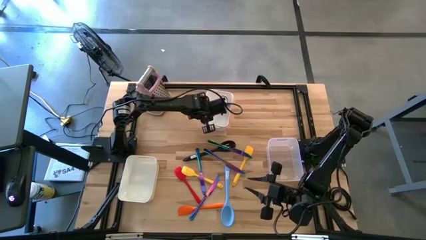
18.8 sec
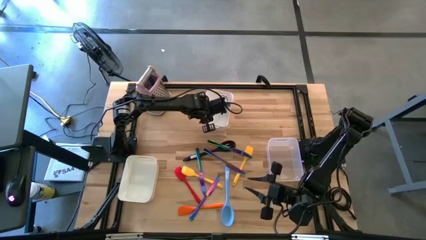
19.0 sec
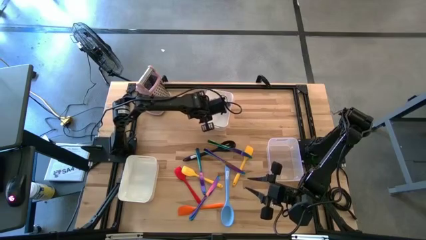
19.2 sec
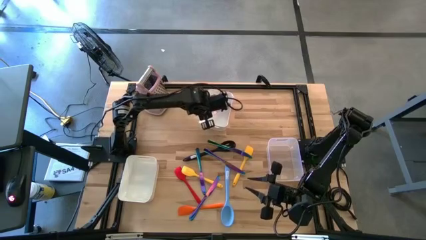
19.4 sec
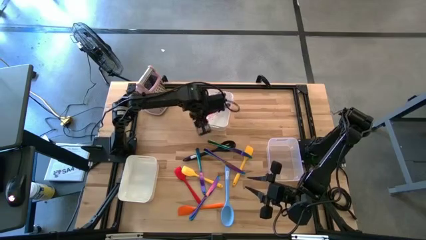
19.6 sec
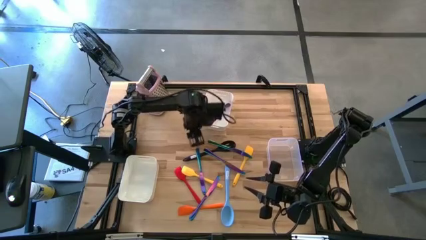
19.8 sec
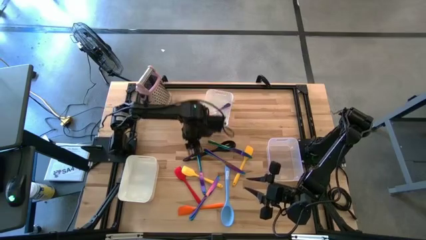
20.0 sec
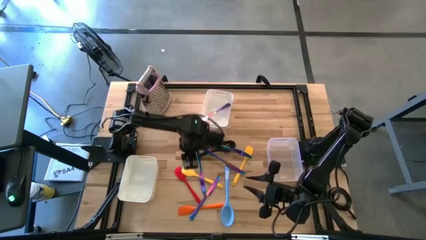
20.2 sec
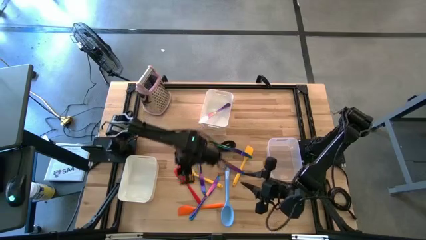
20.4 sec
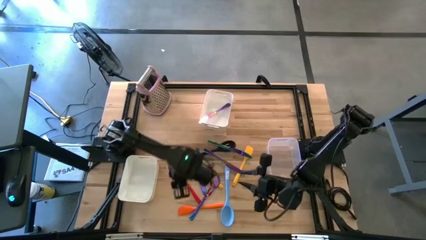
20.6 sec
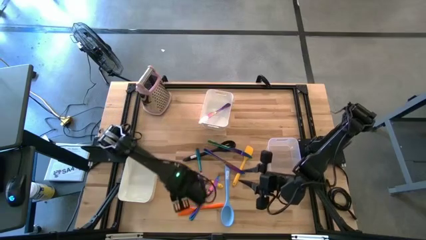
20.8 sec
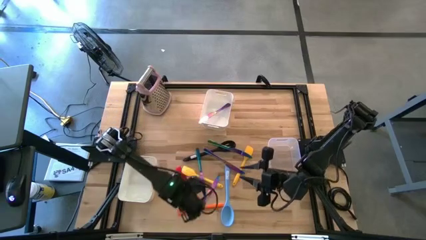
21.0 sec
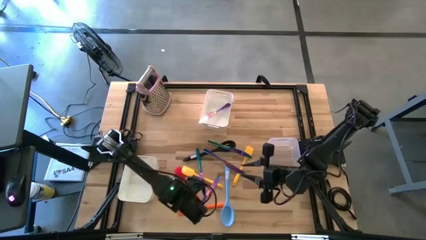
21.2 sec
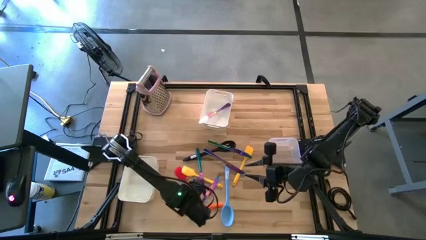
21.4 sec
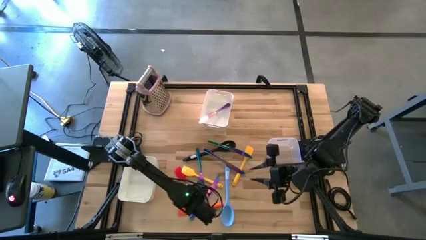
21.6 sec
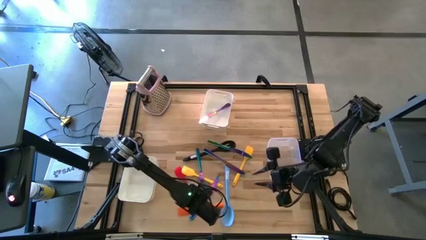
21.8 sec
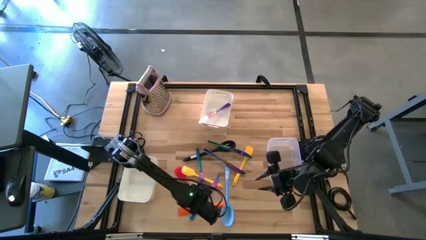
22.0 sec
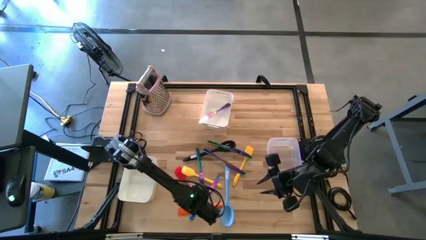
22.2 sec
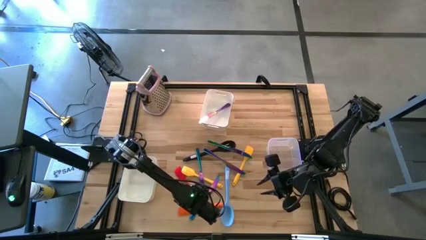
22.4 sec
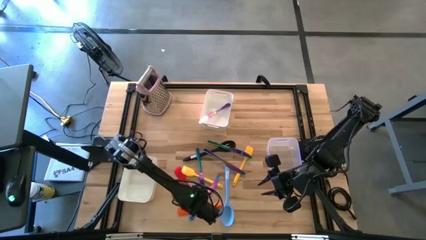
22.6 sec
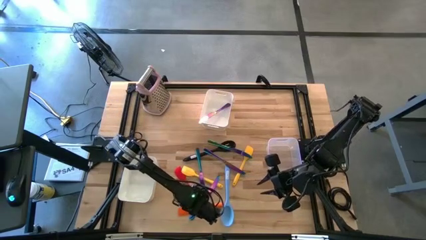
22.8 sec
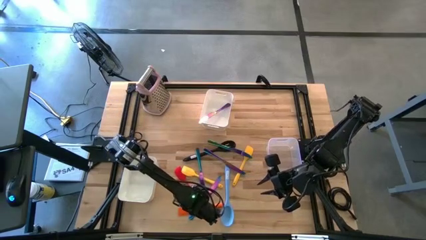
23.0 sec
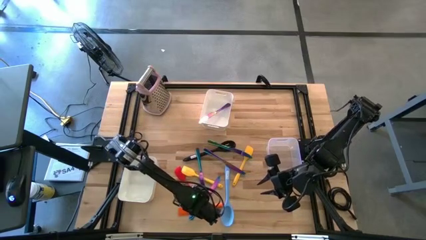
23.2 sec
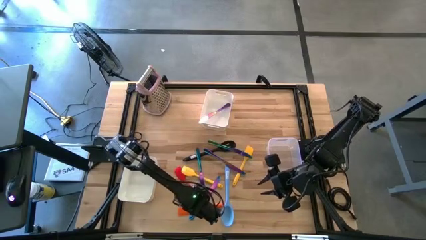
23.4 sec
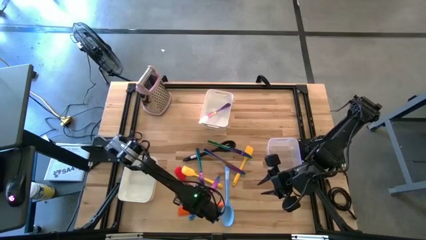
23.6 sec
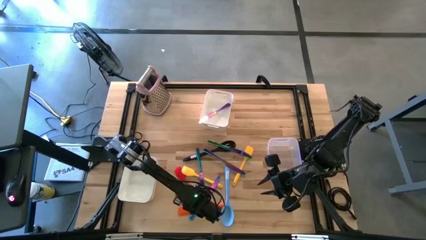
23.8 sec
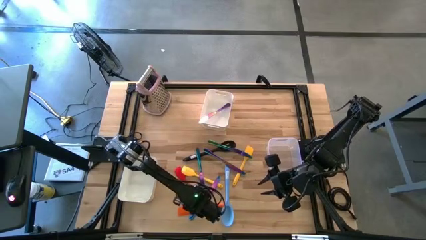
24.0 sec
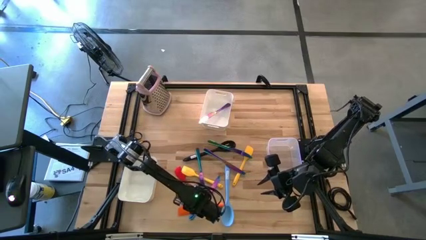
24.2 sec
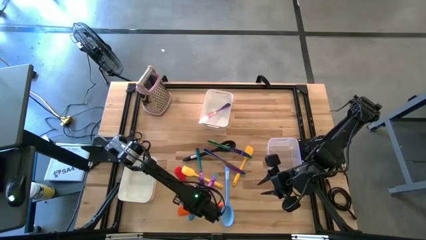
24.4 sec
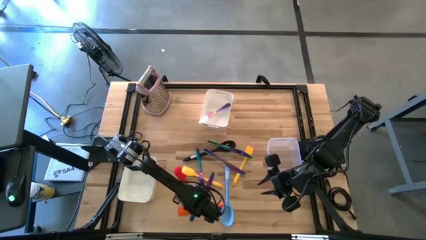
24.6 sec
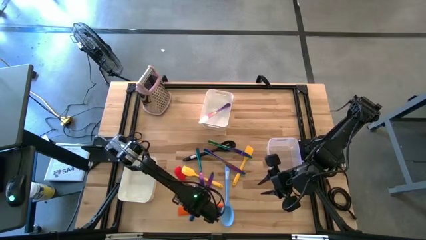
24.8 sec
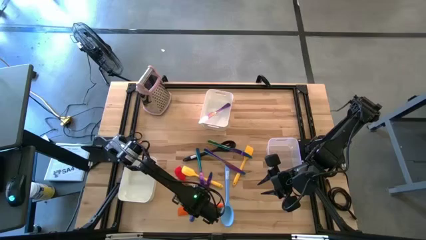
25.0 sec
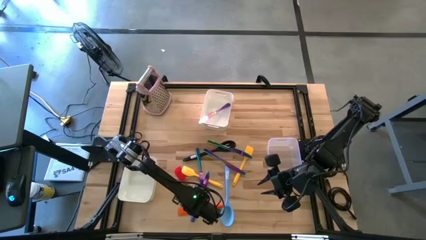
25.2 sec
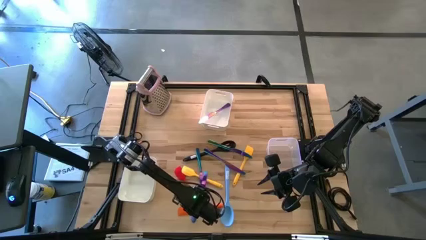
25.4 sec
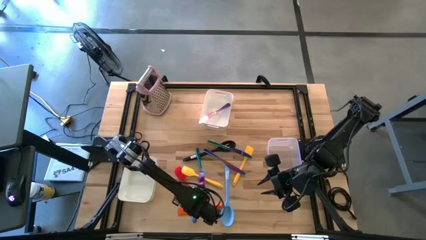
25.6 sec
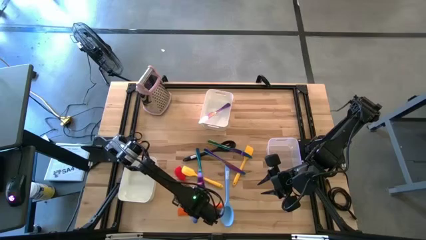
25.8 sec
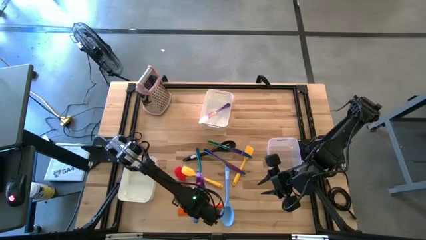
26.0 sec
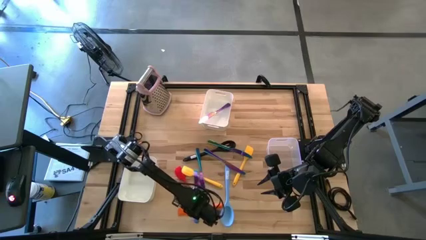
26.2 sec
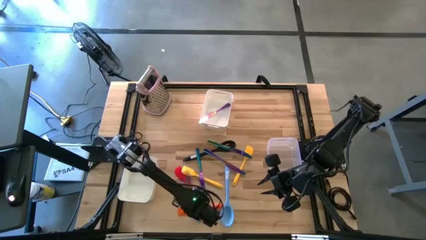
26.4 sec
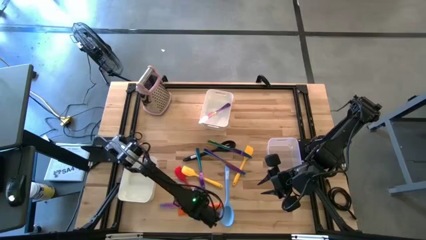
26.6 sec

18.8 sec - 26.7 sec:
Task: Pick & Place Kitchen Items
Put the blue table knife into the top white bin

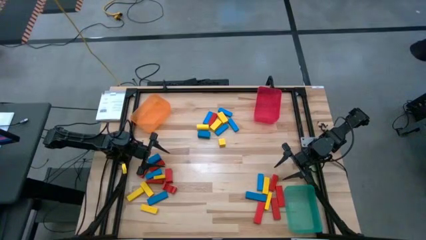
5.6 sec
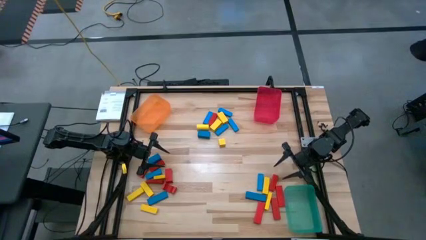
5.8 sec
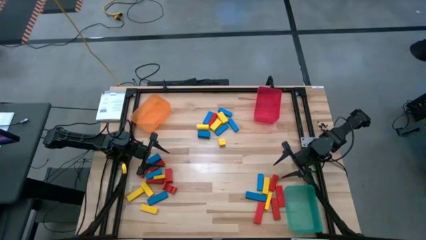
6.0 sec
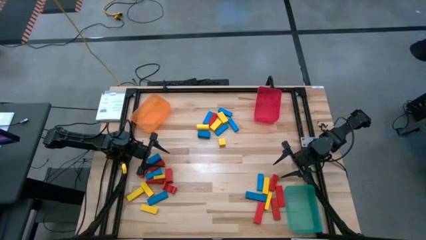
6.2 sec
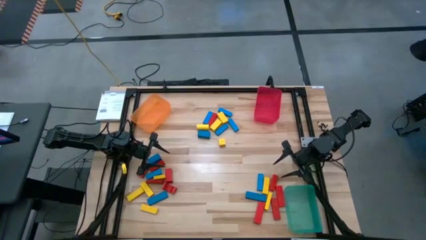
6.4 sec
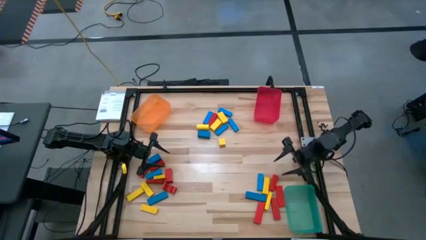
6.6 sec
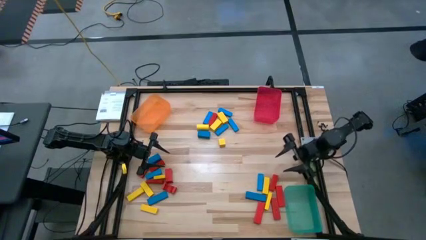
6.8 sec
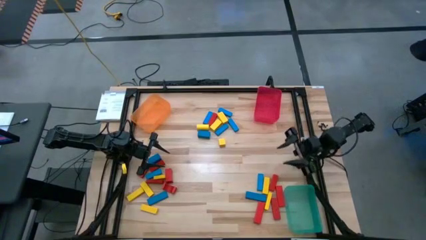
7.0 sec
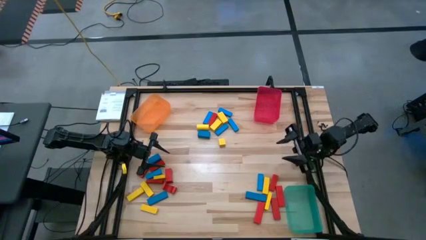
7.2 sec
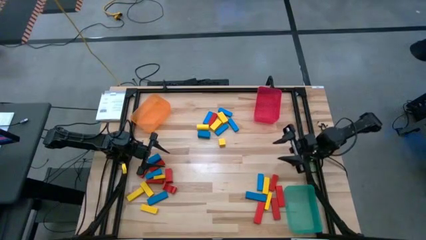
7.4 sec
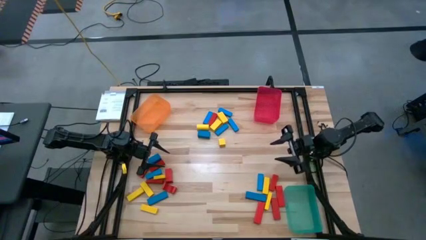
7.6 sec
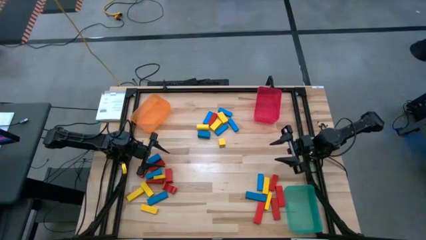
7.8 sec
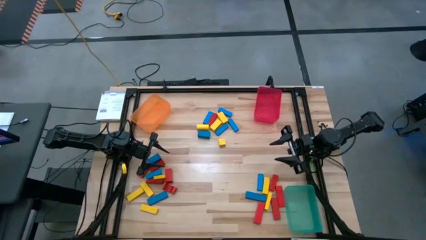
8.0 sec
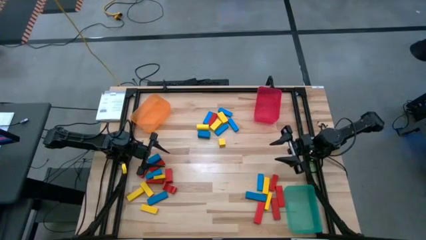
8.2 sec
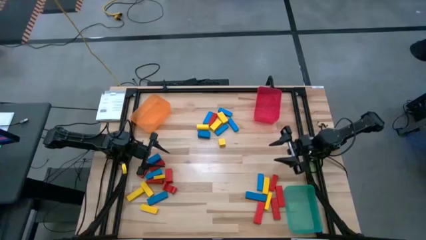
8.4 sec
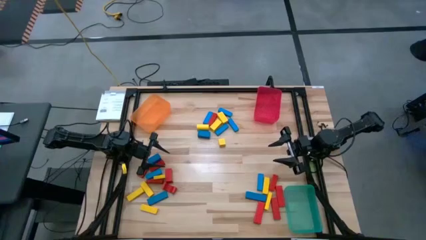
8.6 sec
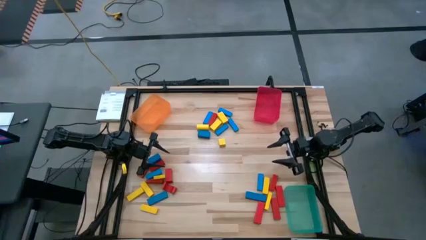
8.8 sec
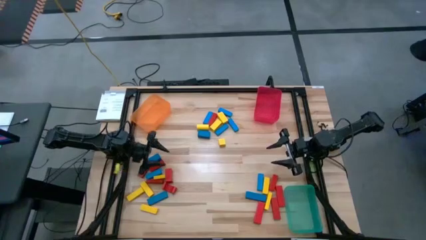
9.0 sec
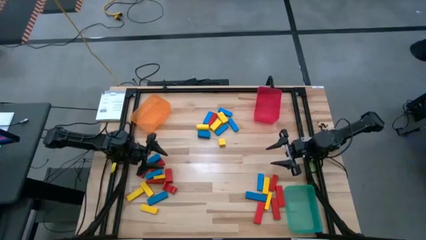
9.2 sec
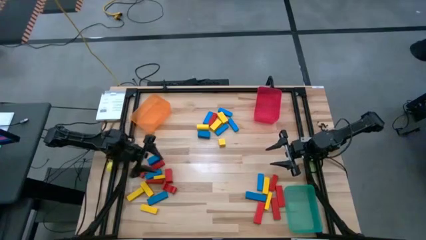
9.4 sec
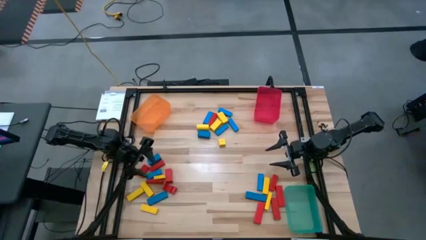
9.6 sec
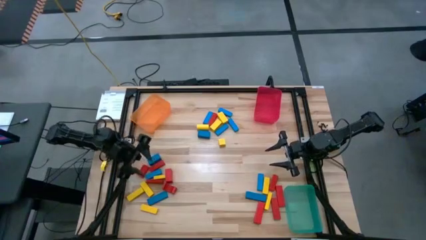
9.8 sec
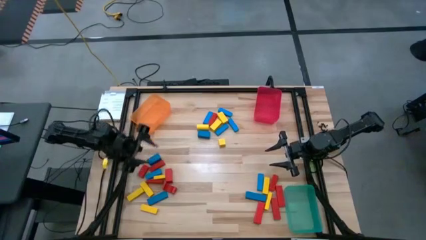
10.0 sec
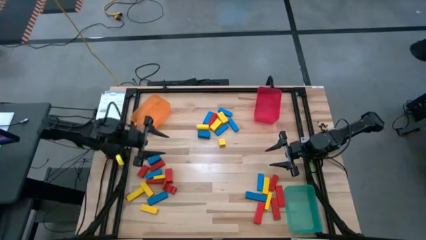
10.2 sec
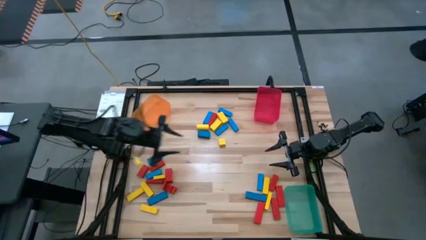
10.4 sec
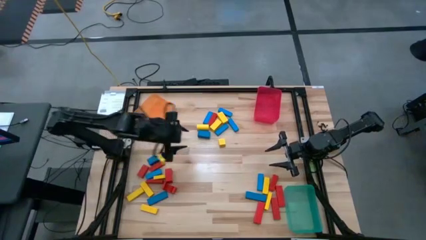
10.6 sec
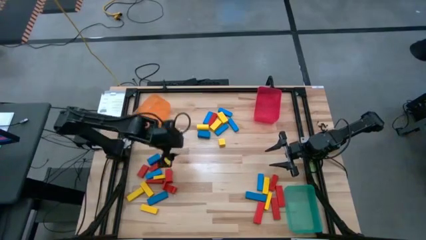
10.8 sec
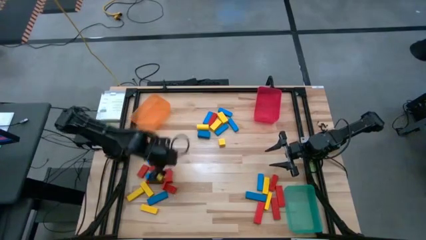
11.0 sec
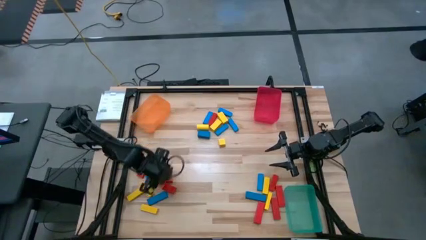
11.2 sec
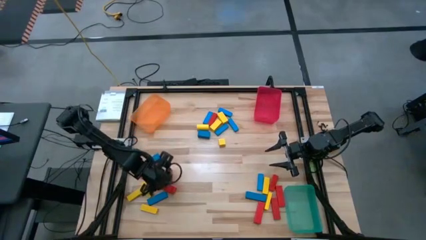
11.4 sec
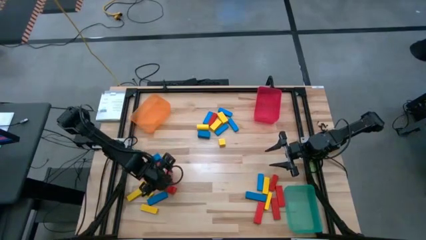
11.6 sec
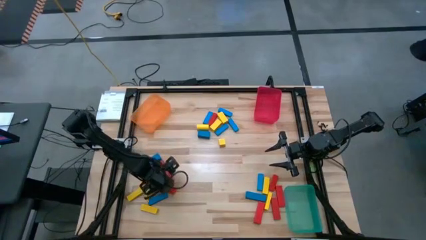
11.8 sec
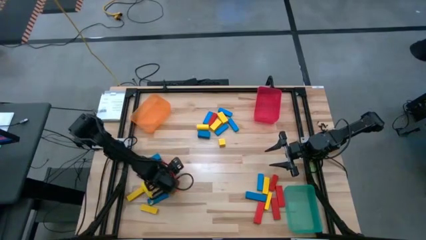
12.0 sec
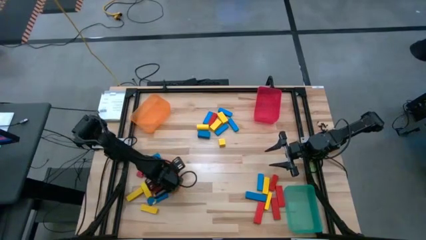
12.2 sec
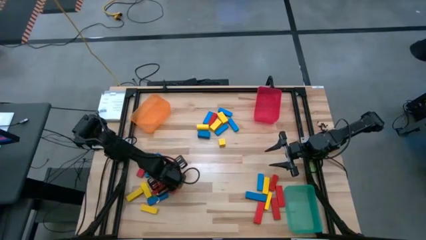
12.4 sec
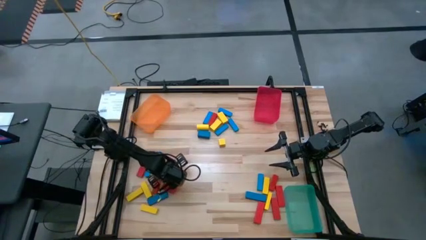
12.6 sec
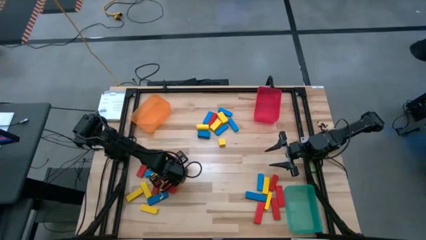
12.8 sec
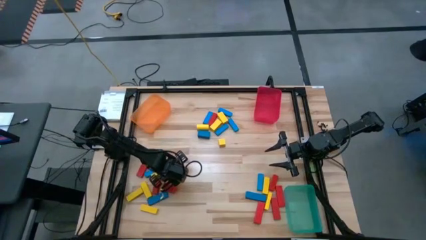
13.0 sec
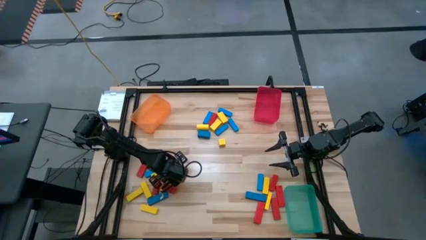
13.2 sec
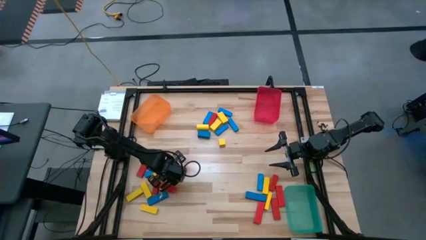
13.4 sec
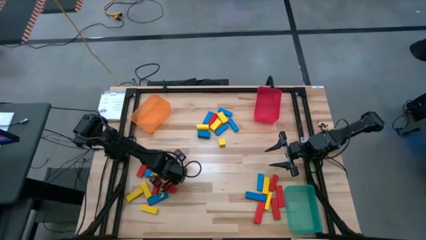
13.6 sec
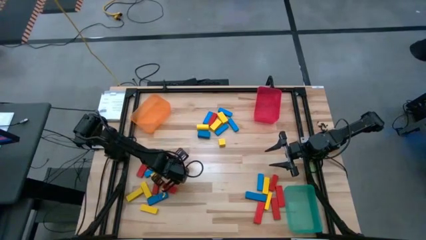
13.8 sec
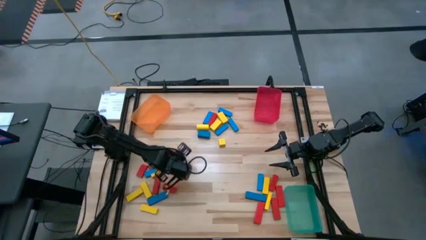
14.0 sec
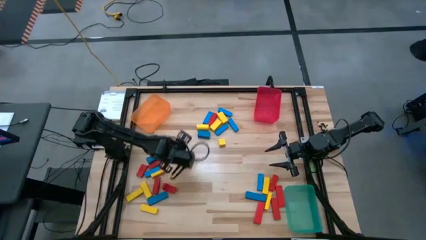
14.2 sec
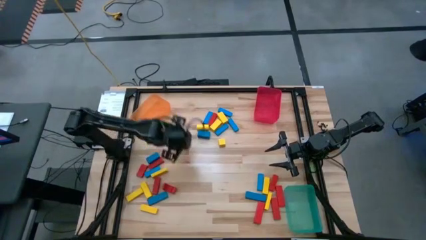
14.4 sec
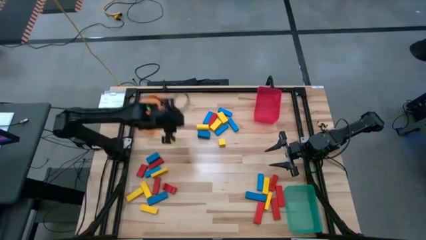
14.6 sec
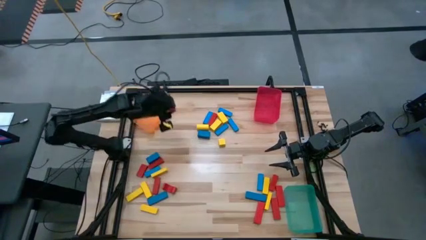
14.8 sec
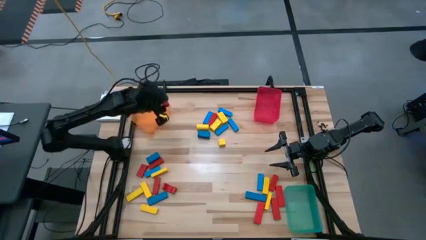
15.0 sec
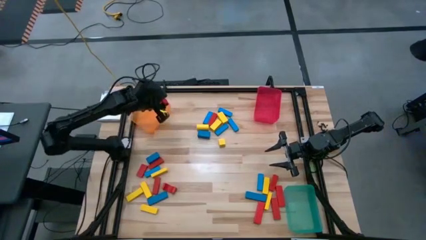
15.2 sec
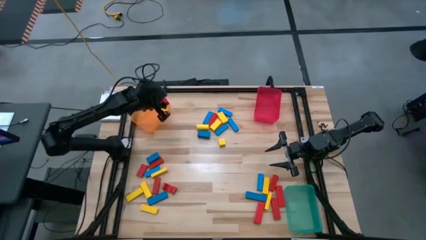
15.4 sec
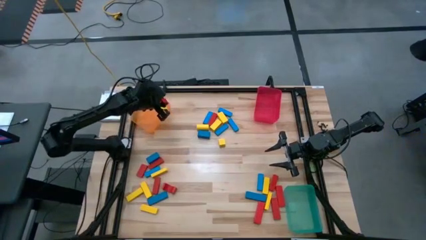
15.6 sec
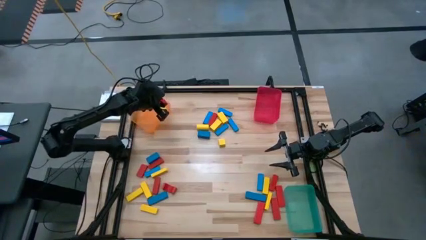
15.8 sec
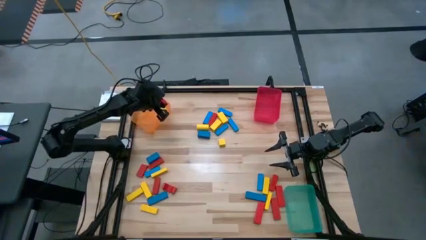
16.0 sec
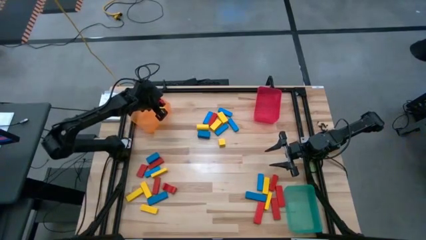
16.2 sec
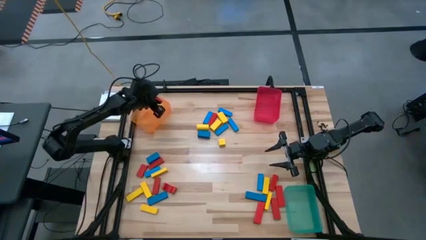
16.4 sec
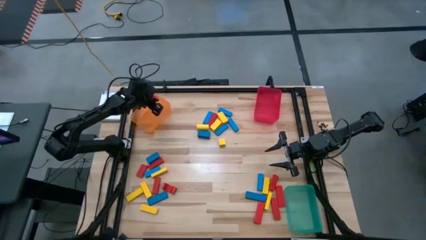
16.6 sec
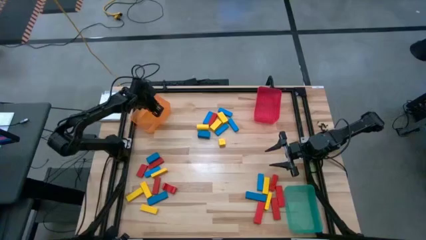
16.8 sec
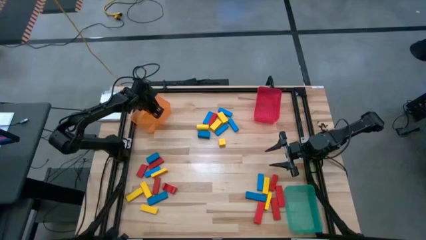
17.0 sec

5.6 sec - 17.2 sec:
Task: Sort blocks
Put the red block into the orange bin
